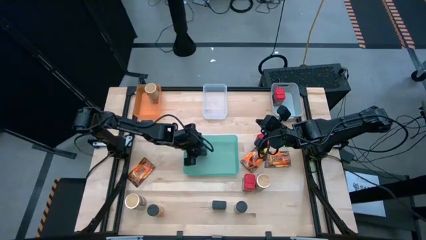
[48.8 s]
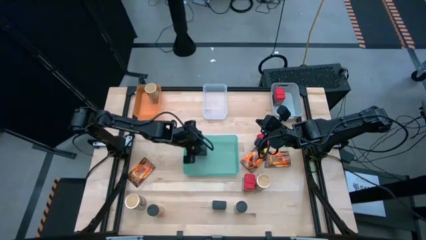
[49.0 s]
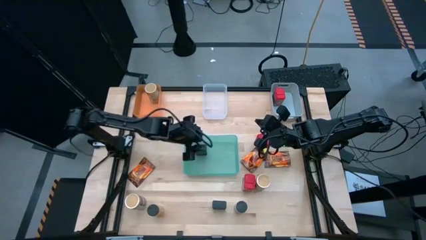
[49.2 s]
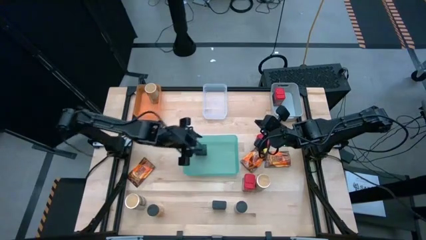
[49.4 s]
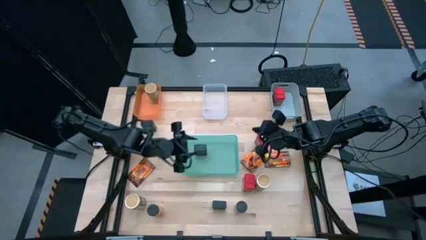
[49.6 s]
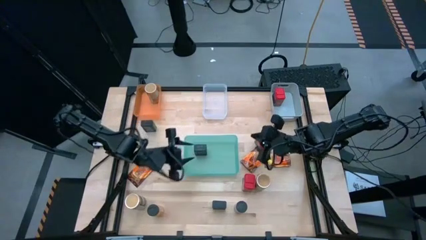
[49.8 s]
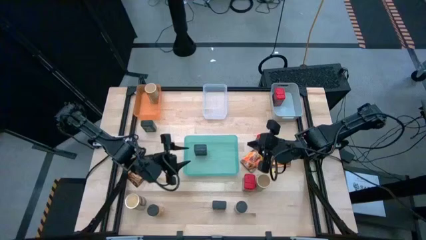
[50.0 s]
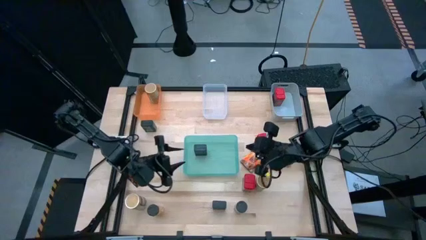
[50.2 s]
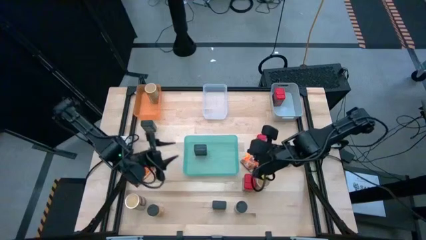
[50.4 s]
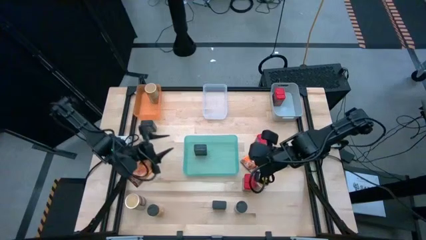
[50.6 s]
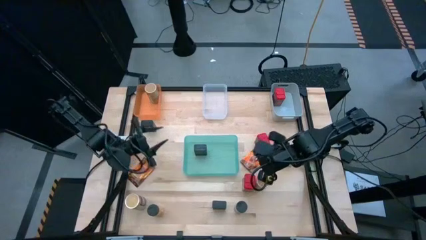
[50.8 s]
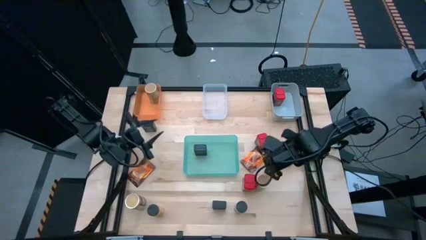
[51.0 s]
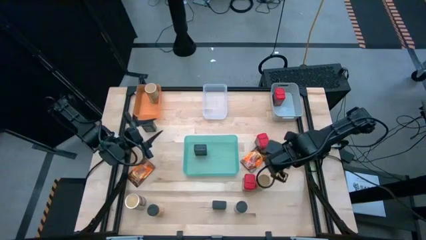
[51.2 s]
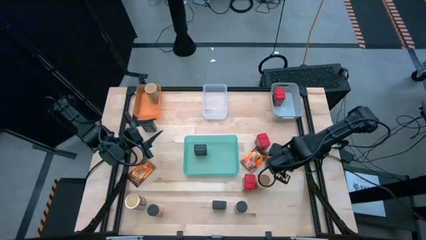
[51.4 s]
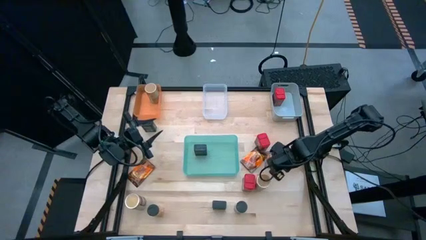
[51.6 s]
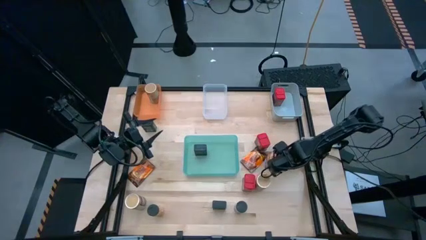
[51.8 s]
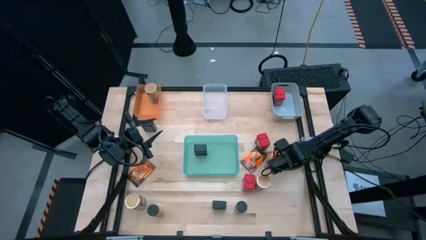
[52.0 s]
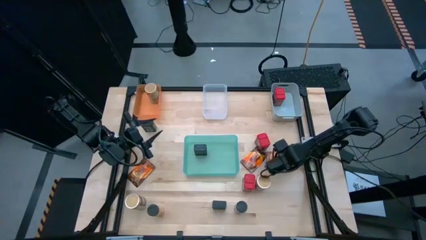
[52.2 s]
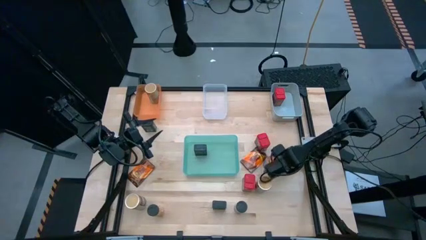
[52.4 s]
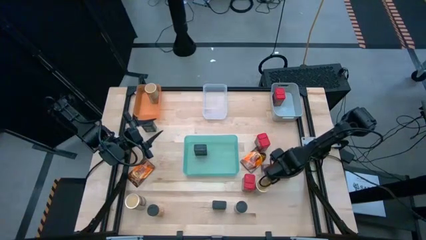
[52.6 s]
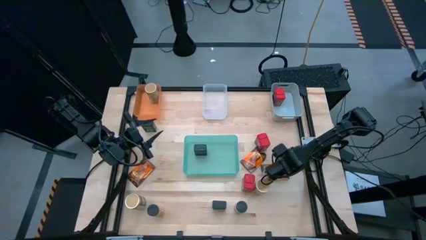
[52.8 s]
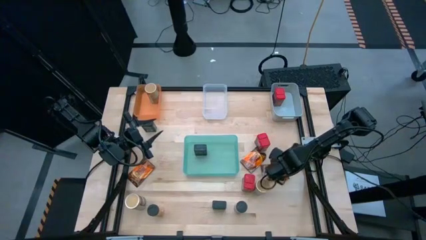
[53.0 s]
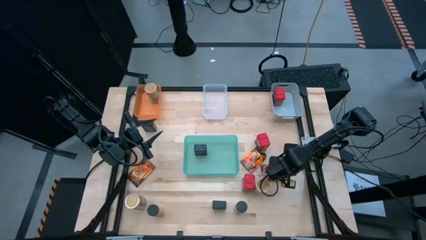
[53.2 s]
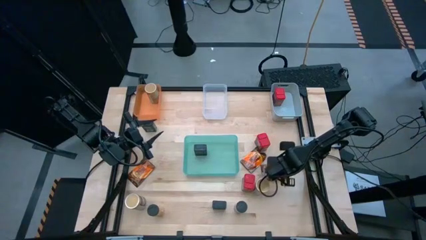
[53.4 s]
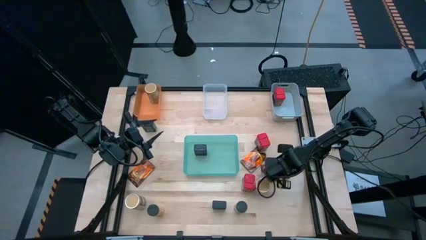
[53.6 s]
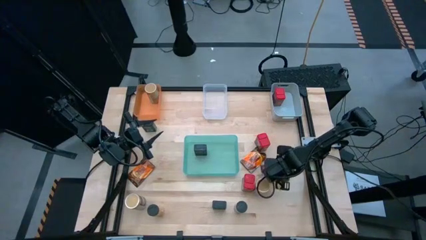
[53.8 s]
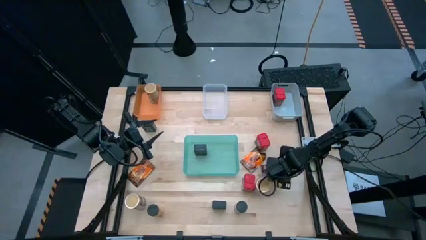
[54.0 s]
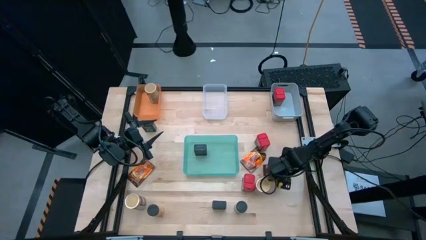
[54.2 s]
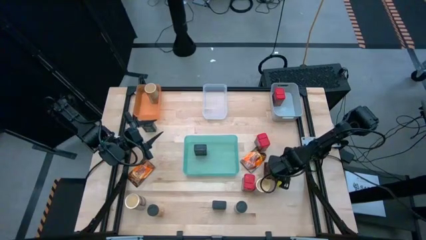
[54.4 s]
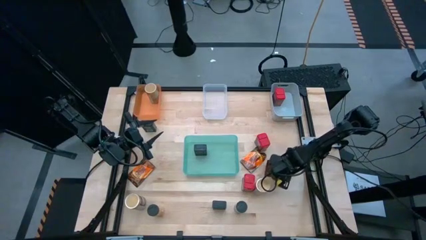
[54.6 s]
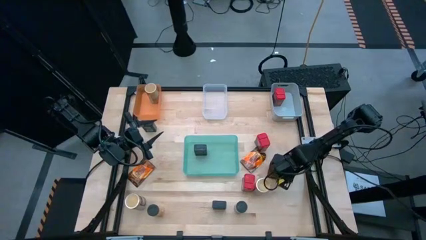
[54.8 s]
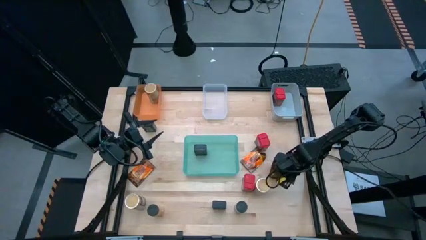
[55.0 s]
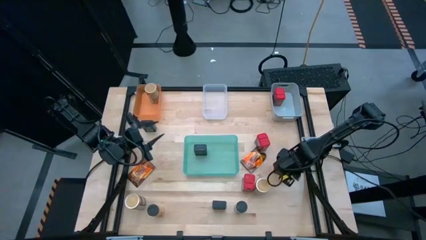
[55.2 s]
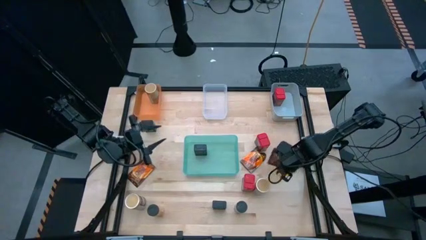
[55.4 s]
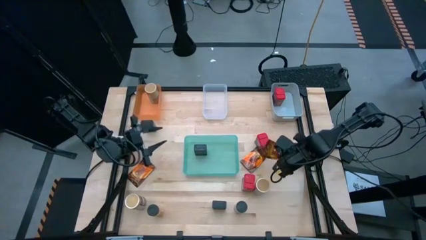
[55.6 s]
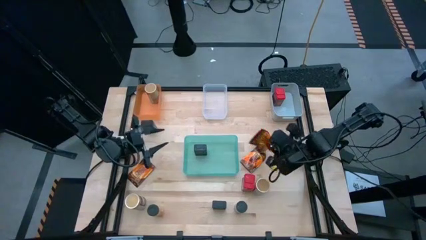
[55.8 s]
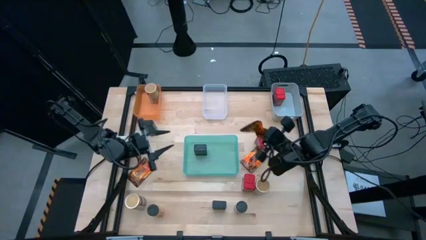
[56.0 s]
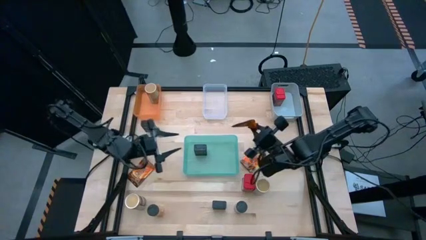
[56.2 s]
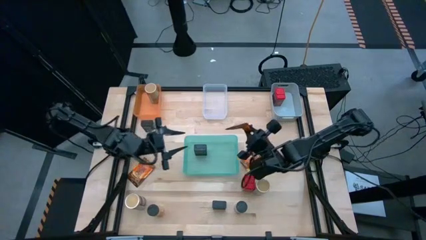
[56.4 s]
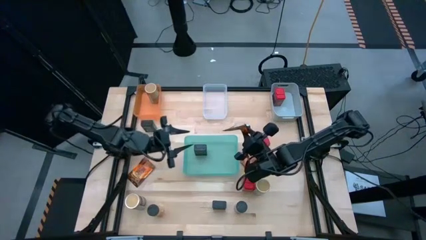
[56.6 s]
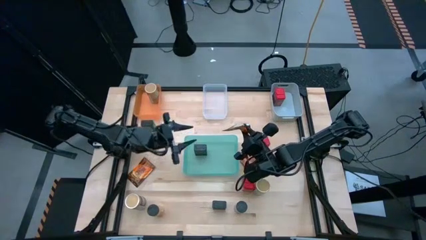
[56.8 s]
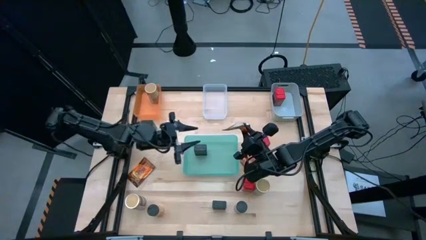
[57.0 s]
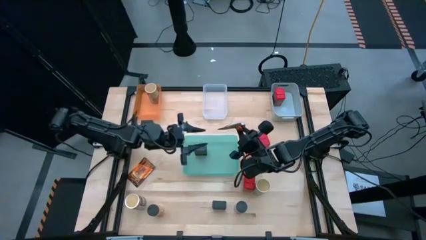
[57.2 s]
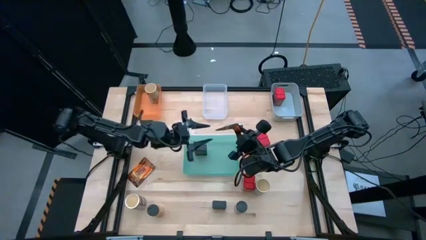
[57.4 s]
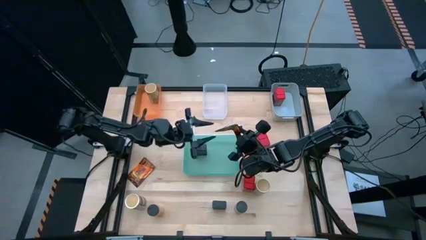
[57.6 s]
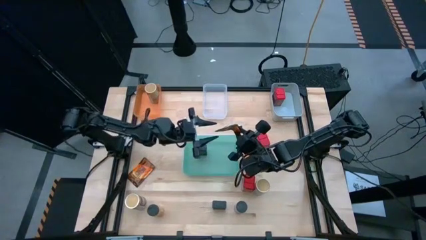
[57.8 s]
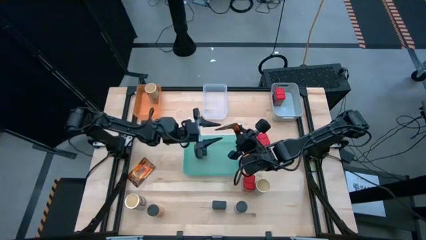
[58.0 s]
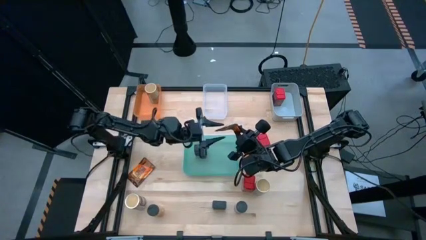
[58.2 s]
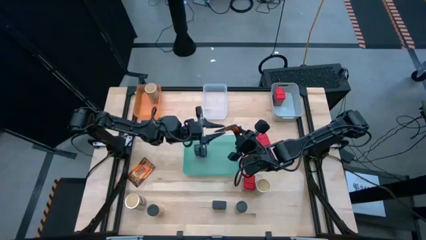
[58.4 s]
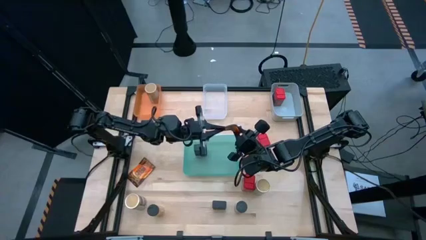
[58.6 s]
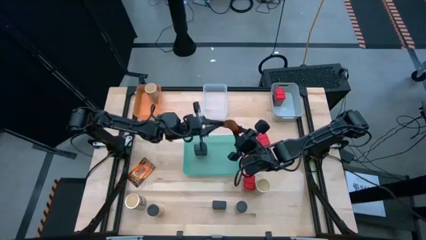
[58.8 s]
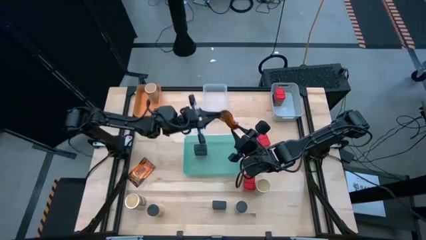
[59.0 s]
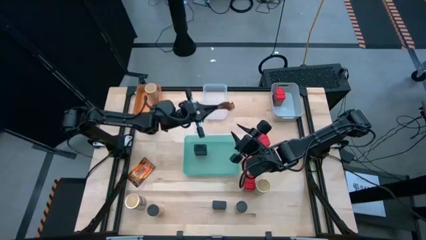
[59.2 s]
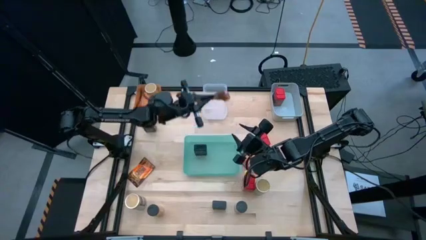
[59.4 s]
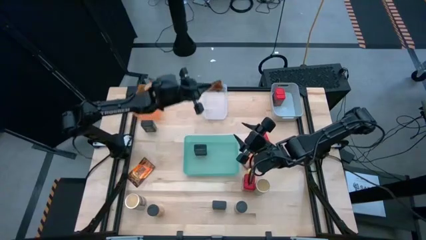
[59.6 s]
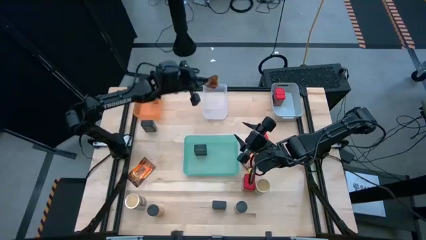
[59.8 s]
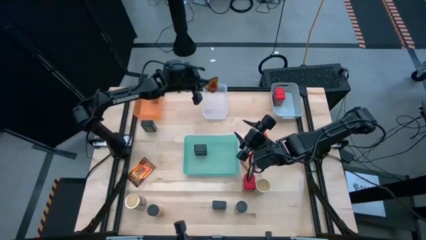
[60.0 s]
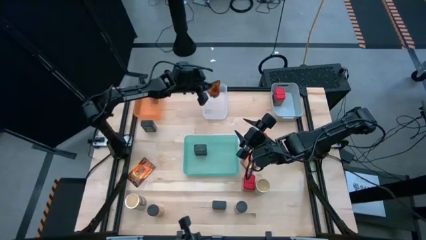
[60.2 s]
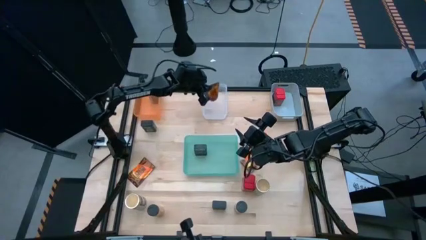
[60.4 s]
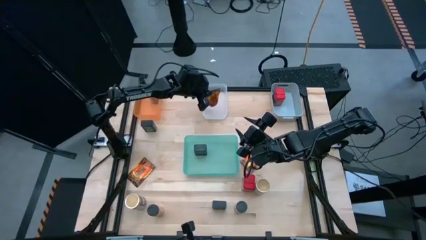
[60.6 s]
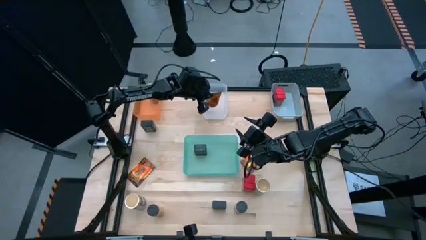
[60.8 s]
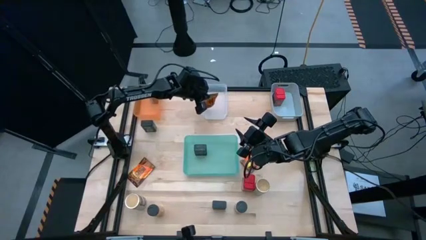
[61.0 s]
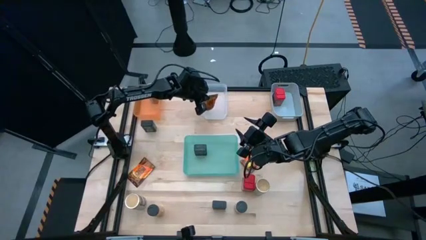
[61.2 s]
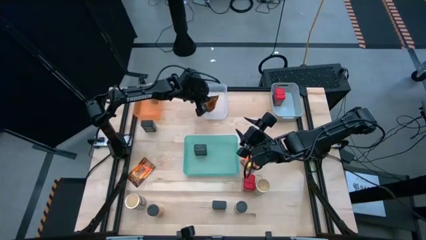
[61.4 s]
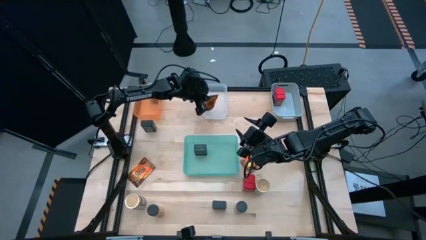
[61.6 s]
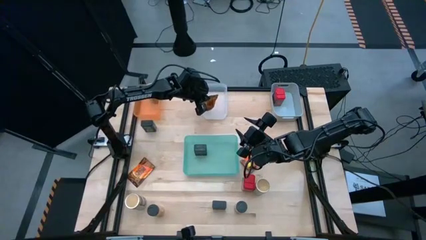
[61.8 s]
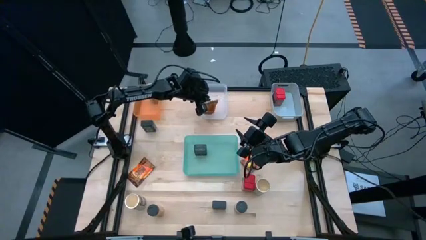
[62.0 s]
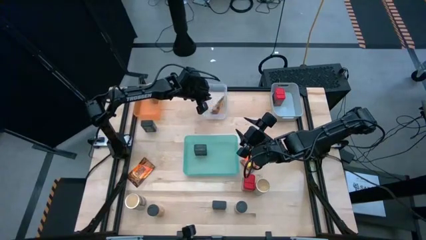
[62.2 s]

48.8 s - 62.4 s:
Task: Sort spices by type
Put the right orange spice pack into the transparent bin

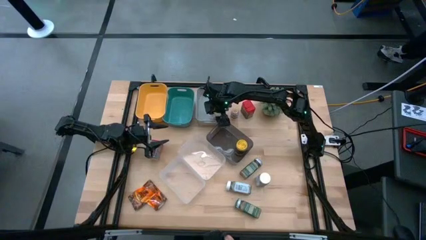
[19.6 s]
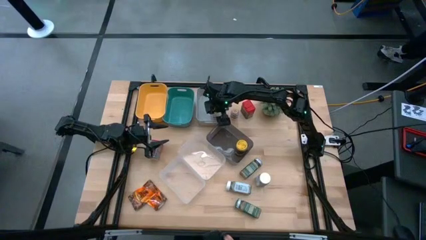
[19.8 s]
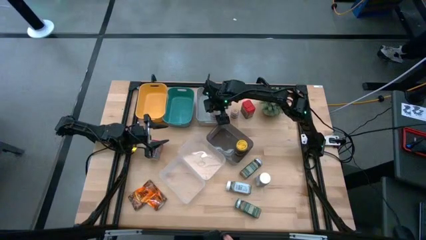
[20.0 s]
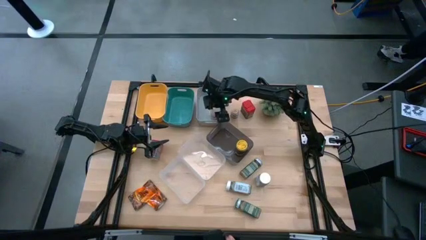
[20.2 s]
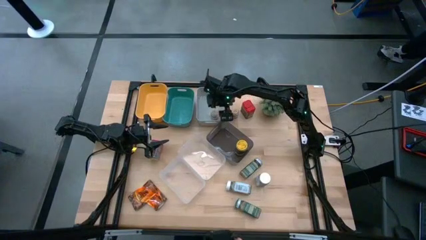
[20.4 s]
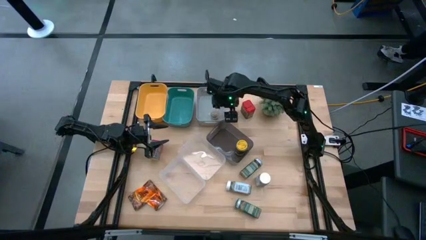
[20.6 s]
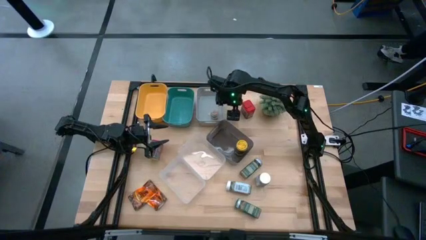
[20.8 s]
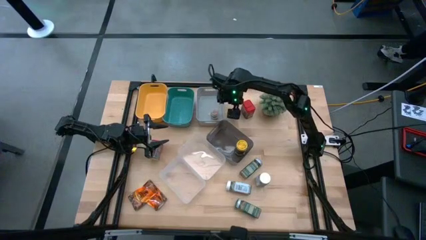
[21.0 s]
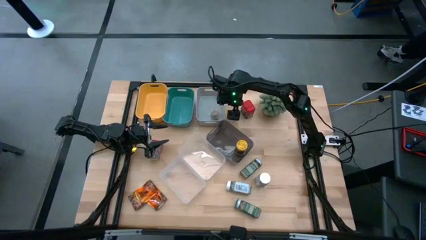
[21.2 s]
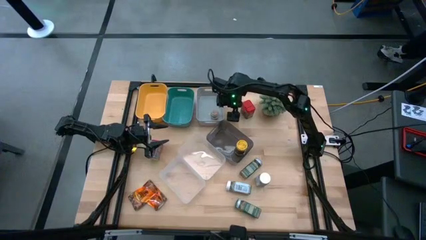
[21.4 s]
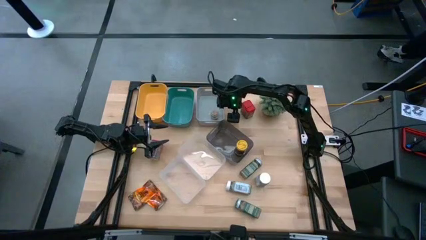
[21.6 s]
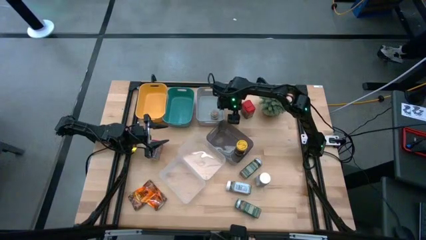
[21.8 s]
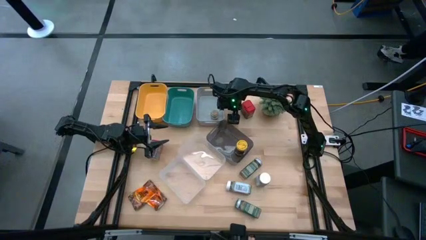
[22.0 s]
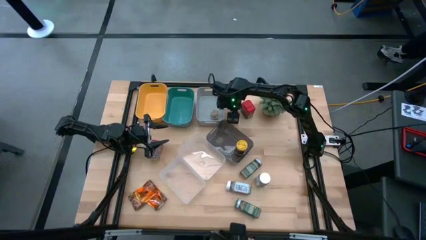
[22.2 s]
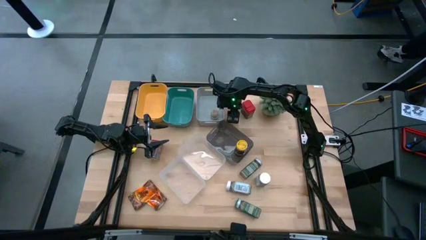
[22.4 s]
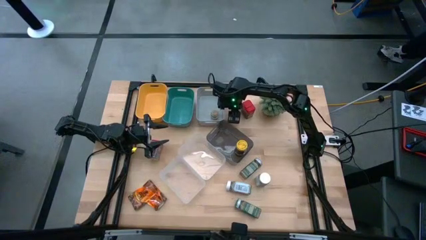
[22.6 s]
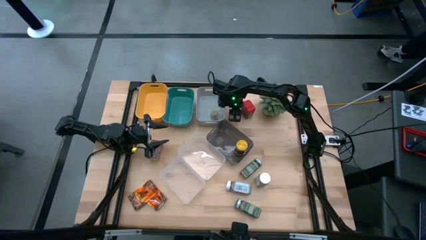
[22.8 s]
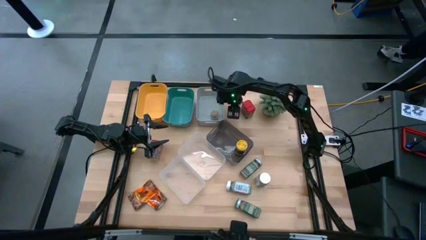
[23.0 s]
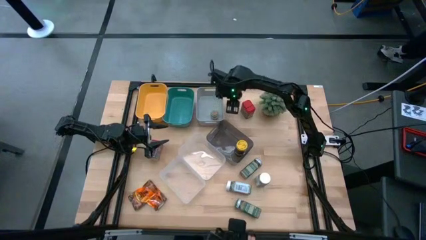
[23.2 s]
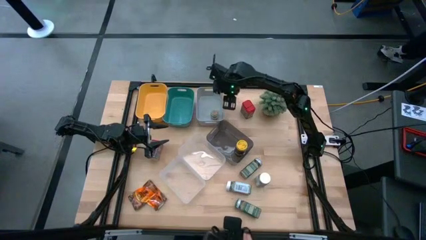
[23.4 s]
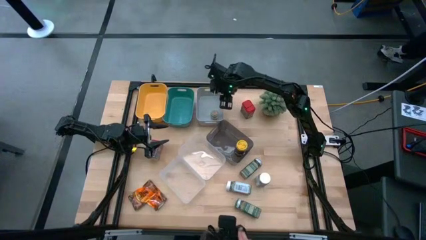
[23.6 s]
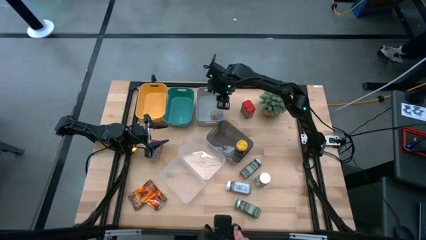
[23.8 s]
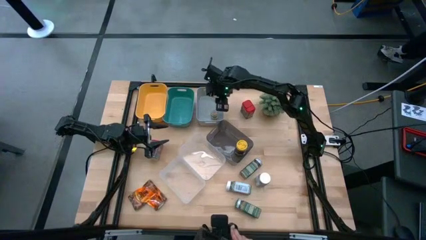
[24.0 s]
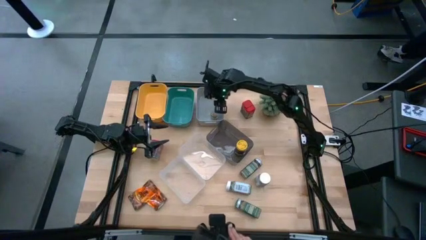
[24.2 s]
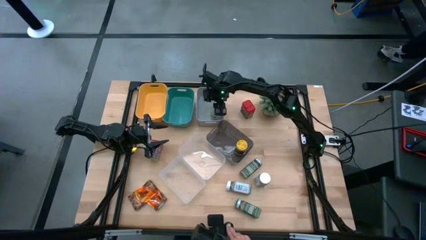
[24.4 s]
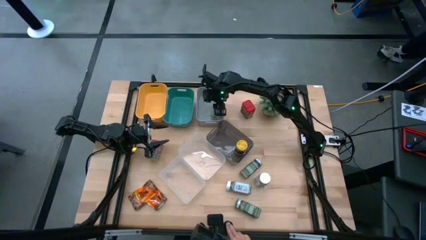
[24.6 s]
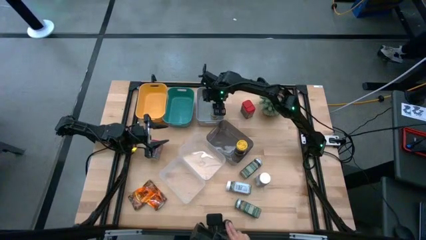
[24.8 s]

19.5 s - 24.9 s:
Task: Sort spices by type
Put the brown seasoning bottle into the gray bin
